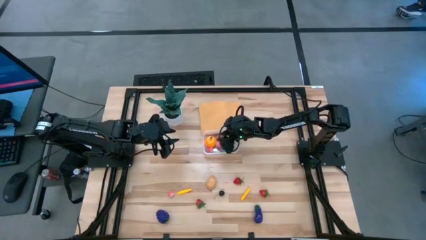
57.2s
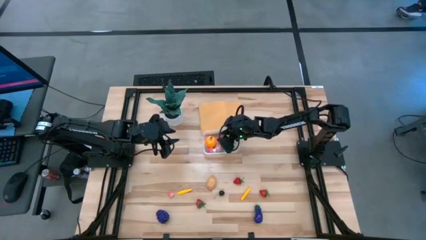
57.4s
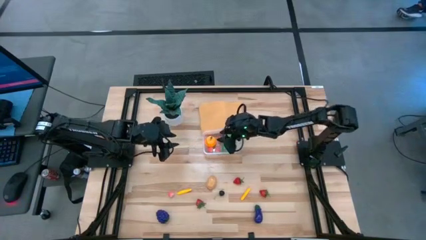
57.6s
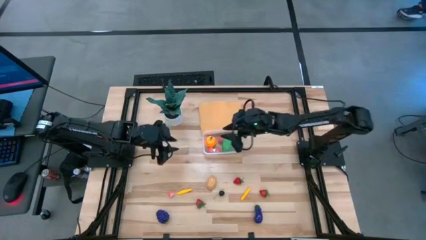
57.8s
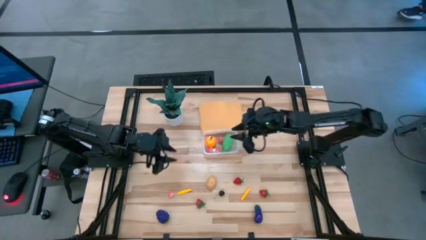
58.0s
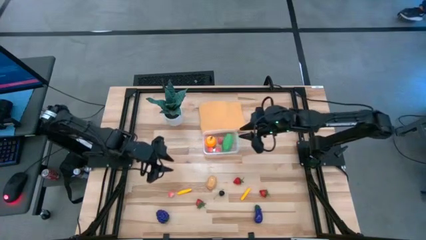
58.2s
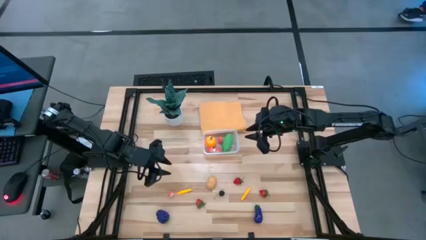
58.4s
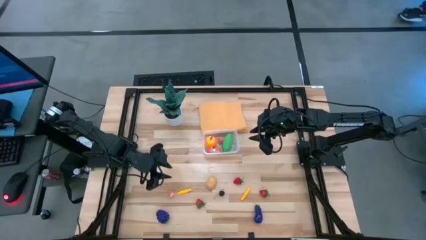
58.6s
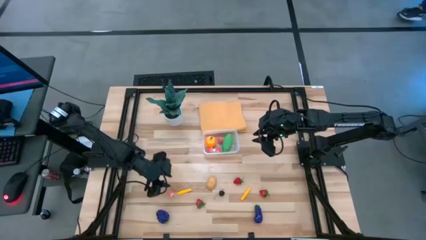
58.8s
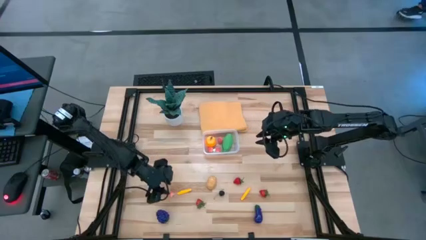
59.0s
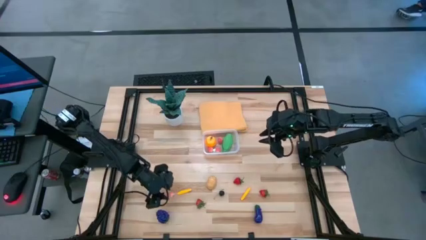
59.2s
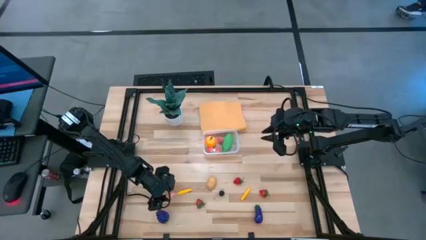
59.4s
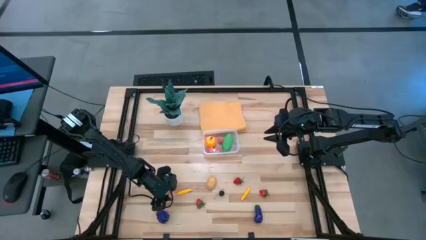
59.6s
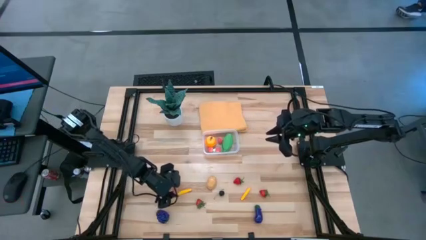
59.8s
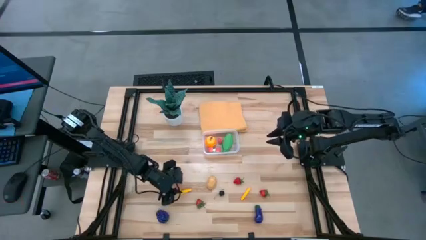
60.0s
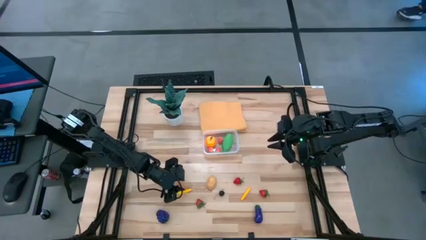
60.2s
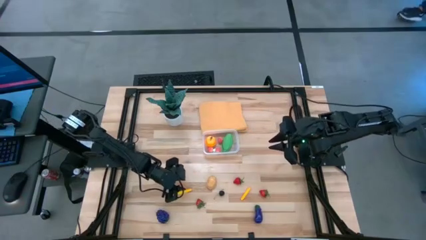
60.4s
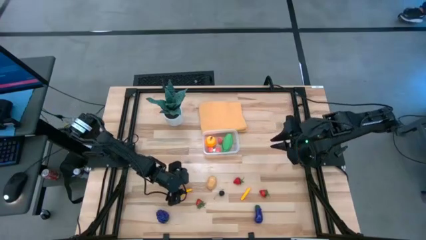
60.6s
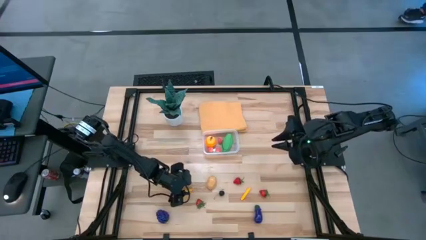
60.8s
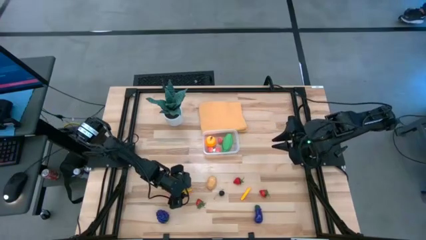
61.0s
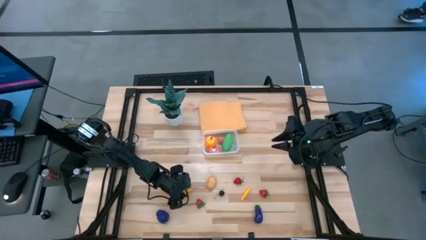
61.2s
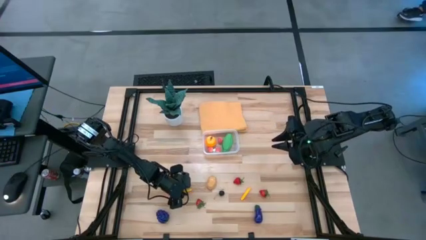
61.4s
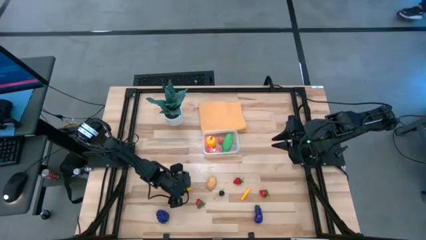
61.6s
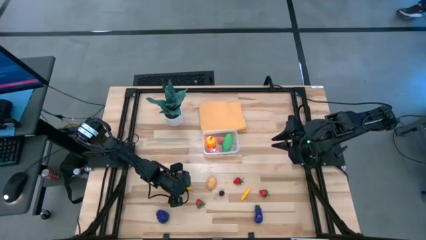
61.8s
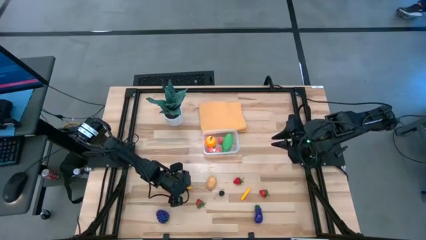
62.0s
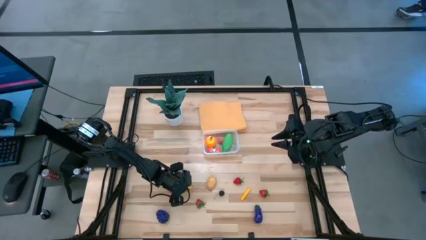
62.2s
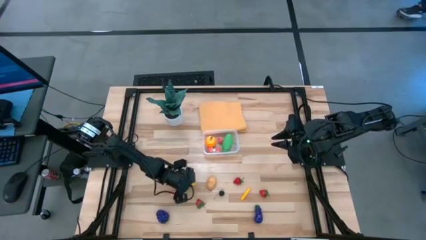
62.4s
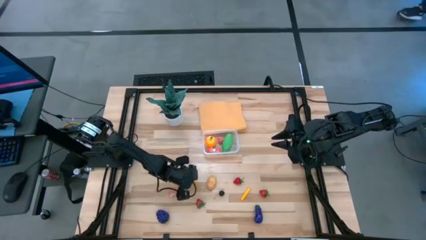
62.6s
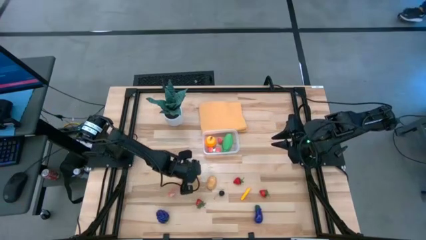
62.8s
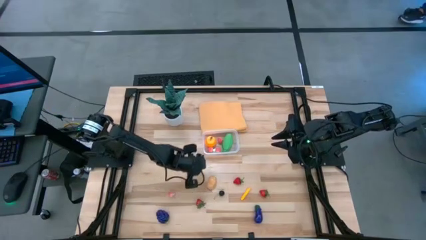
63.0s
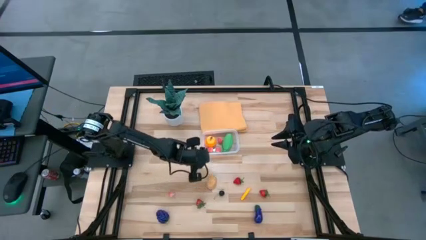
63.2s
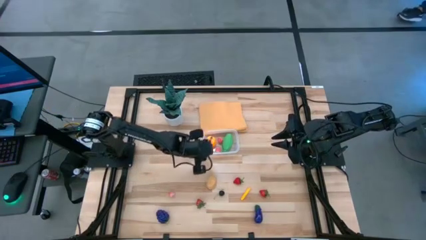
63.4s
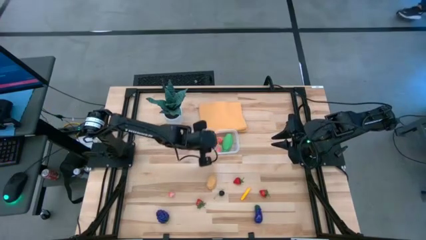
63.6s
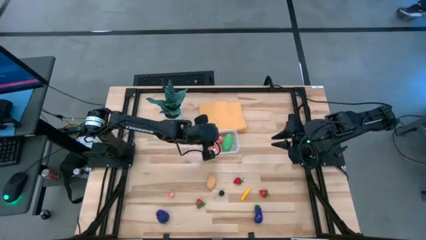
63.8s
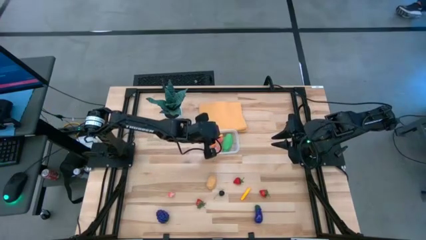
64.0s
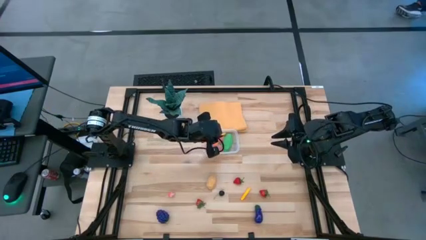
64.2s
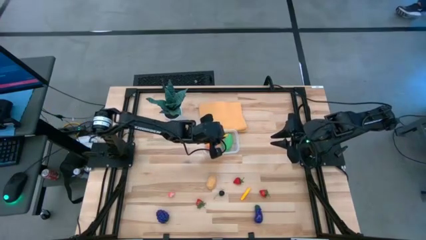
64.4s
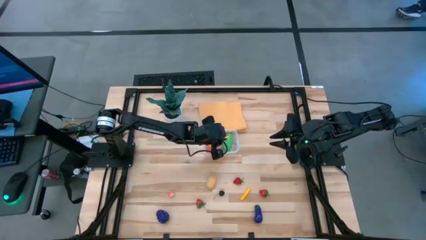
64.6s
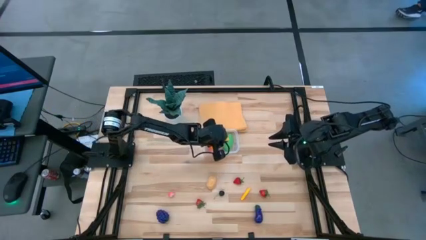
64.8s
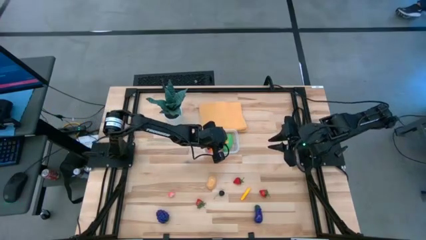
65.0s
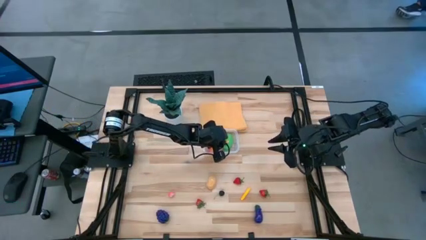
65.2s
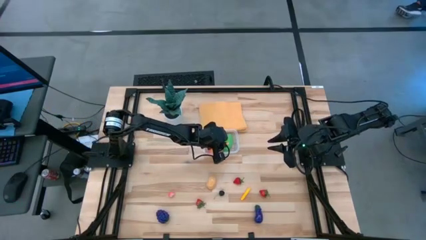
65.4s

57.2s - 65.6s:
Task: Pick and placing Produce into tupperware
Put the left yellow corn into the transparent bin

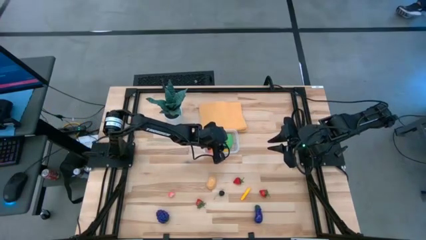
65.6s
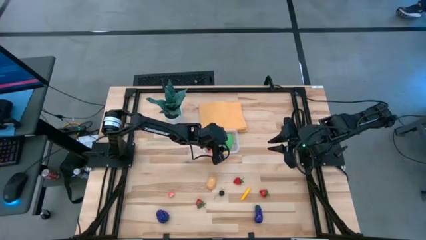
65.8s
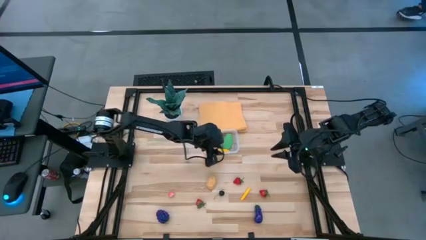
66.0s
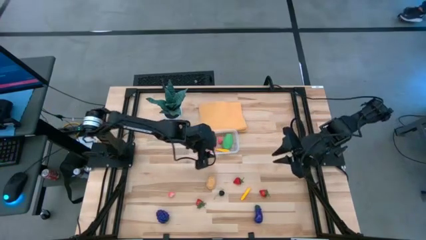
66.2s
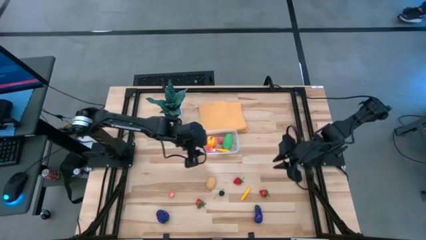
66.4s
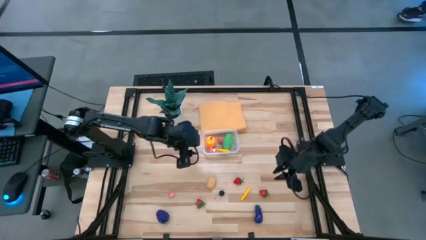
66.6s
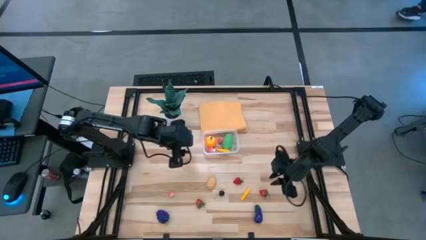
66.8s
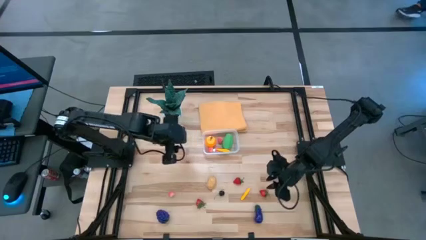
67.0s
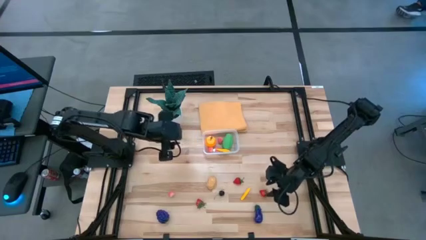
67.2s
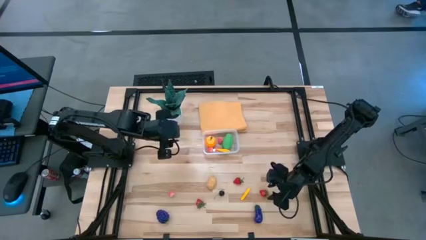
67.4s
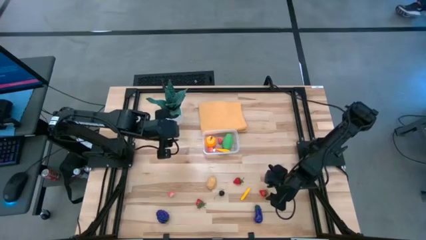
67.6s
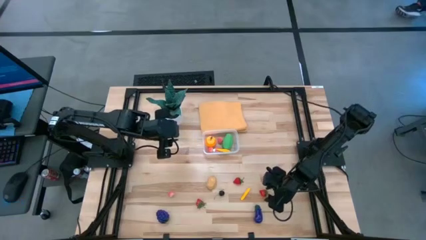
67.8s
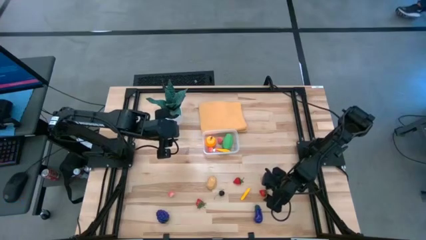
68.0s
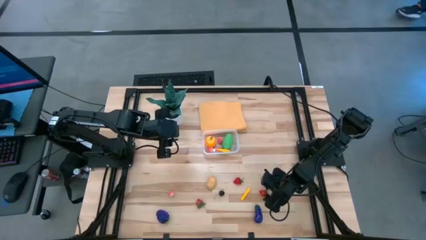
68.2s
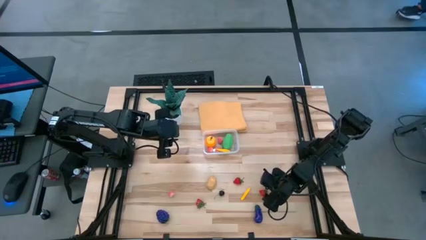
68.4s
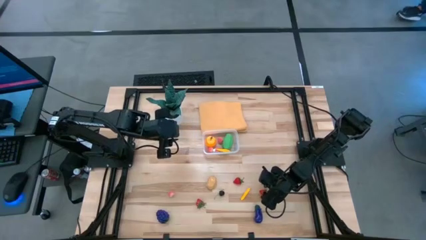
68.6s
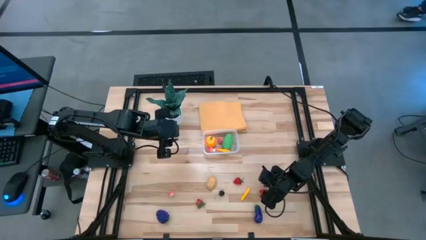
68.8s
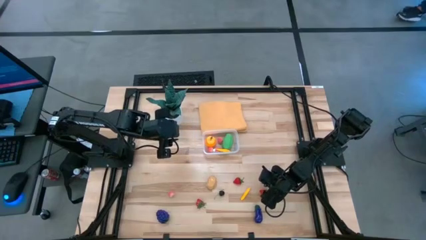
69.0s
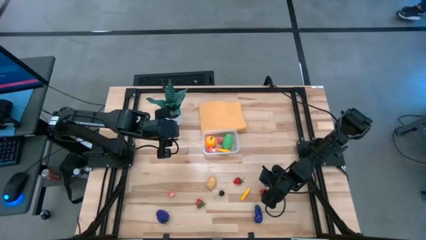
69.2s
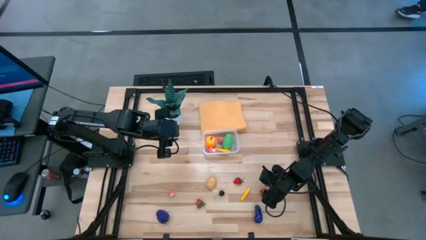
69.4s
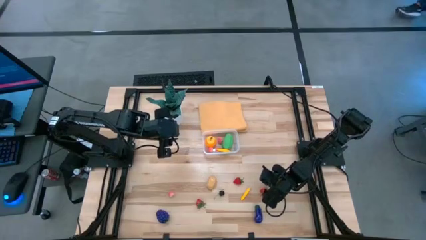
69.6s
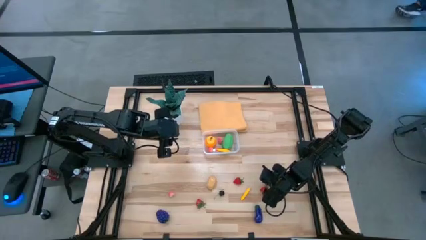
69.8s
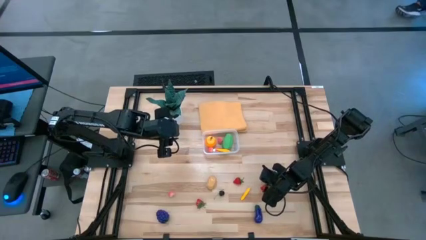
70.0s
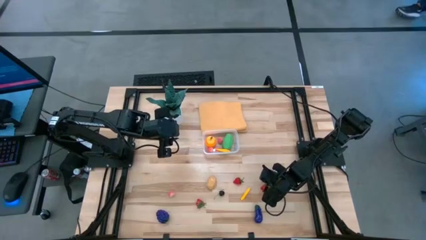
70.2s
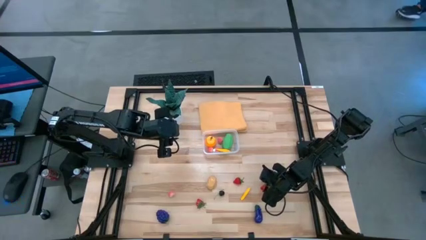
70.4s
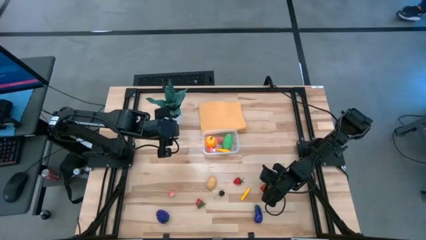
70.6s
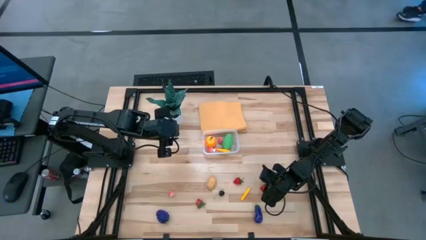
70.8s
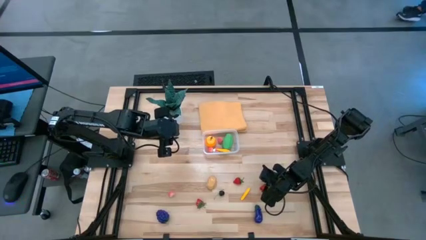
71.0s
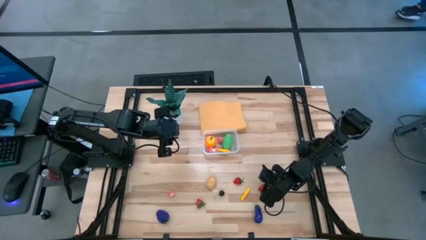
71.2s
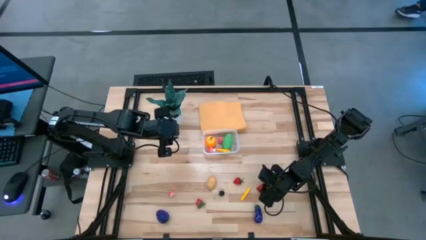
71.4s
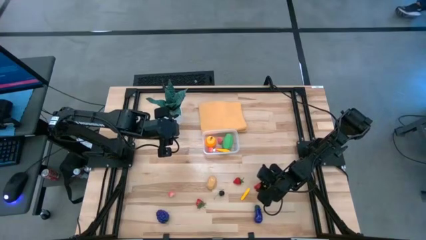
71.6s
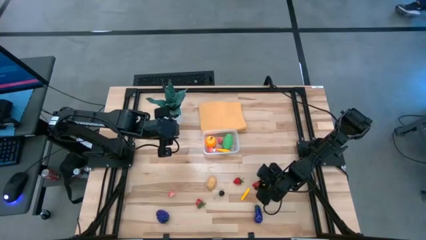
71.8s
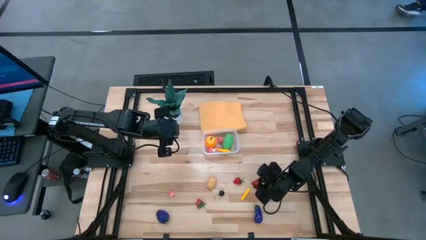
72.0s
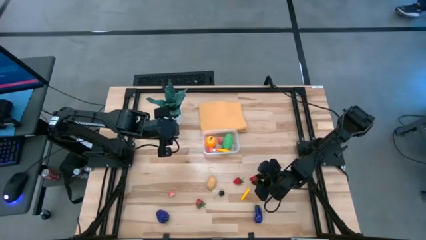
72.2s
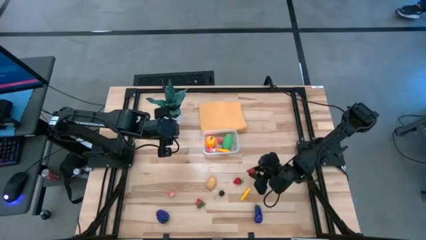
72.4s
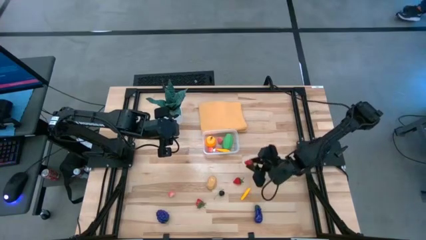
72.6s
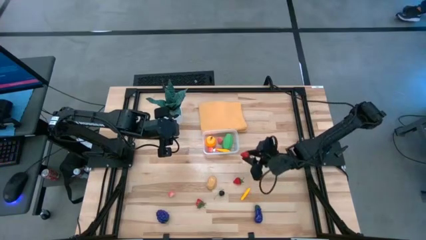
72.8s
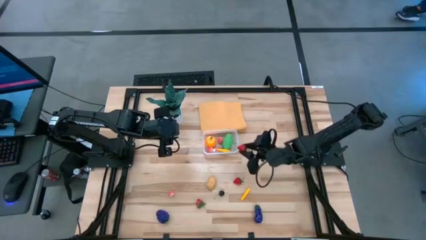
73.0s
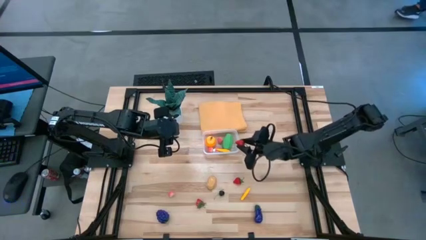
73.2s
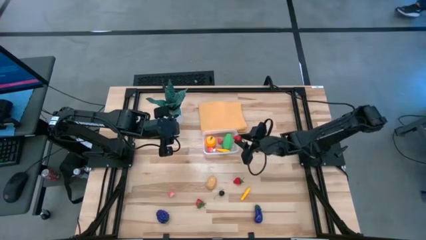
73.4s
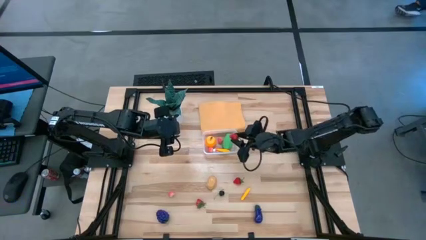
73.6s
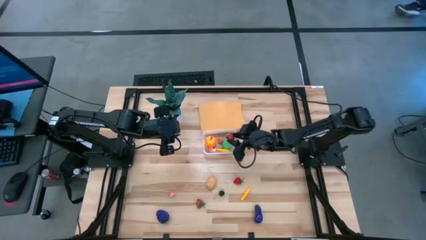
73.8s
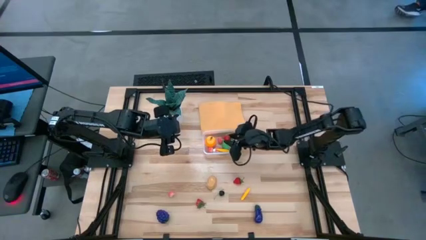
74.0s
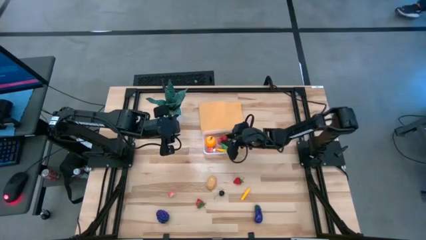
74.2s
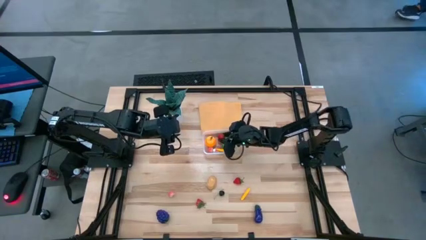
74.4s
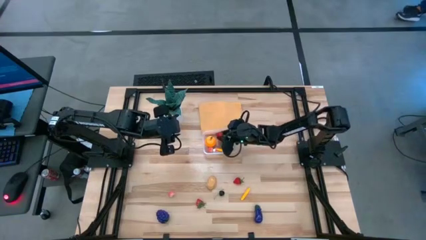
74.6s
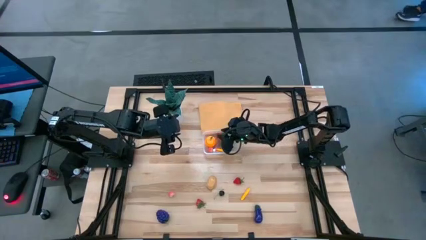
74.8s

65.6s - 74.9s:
Put the right red strawberry into the transparent bin
